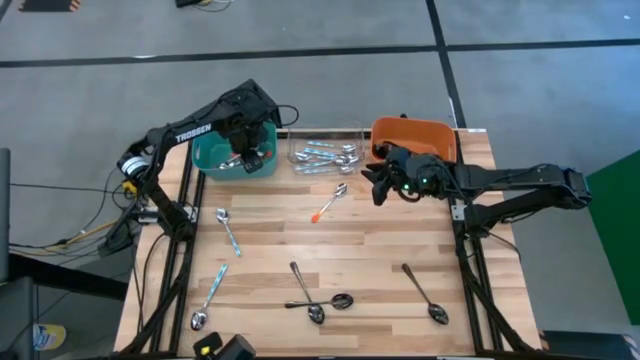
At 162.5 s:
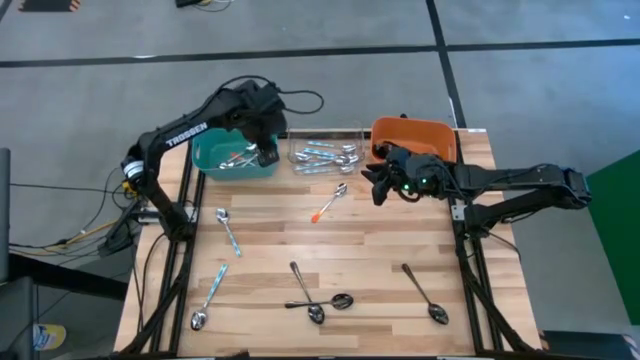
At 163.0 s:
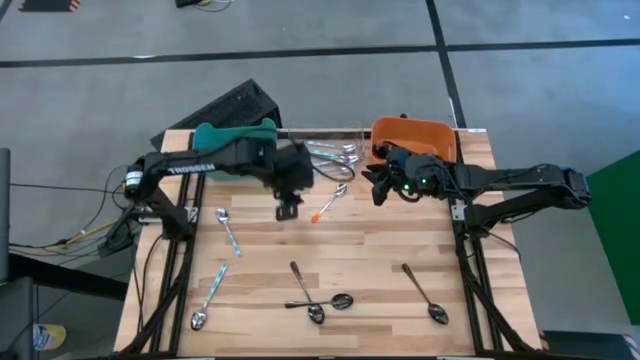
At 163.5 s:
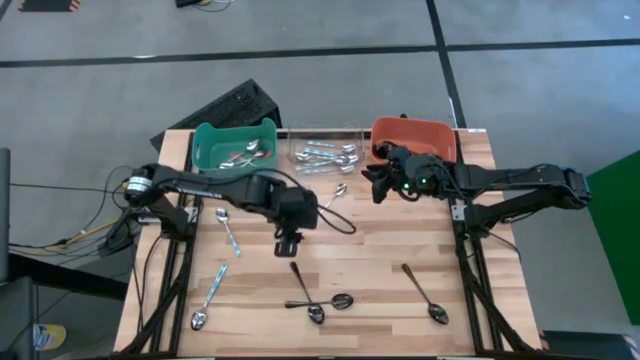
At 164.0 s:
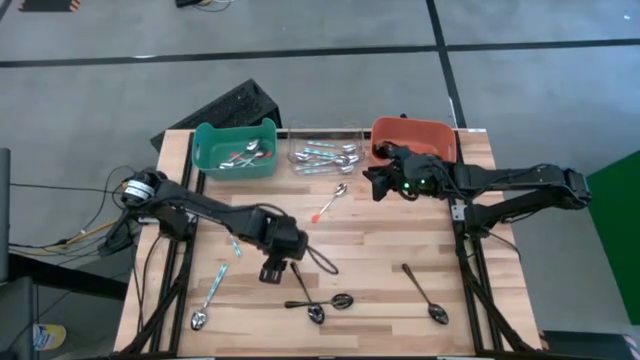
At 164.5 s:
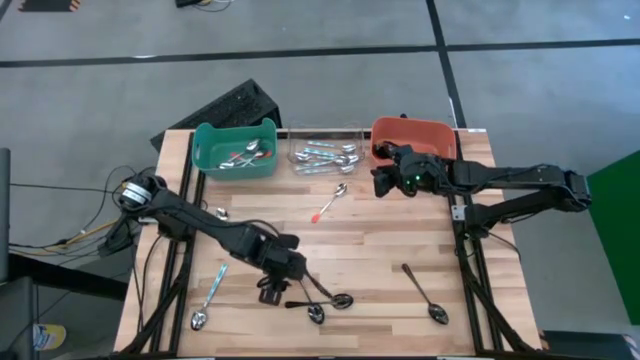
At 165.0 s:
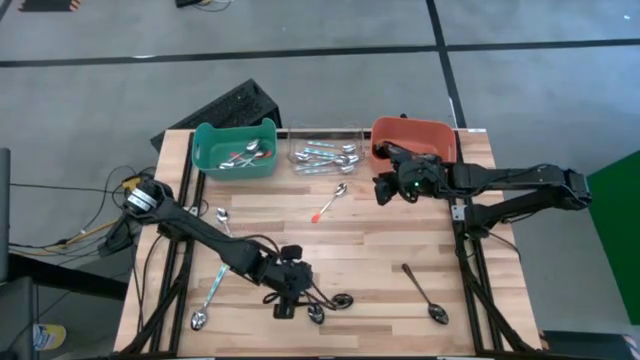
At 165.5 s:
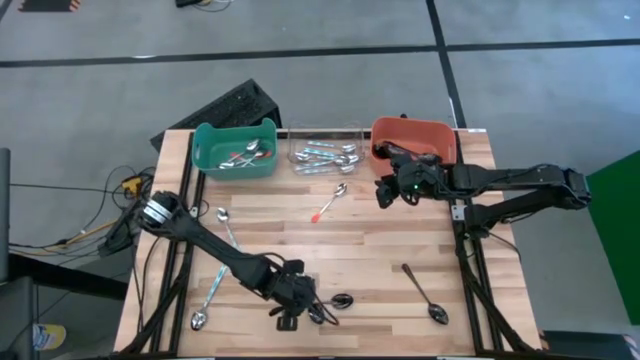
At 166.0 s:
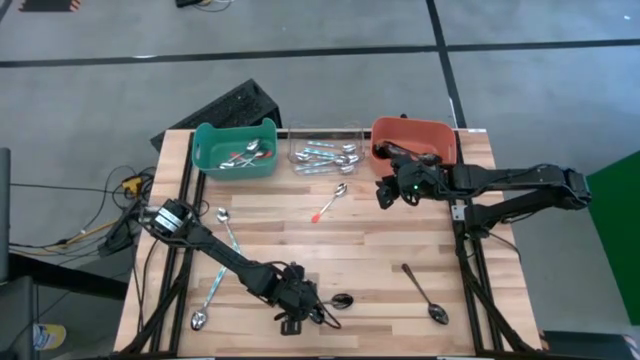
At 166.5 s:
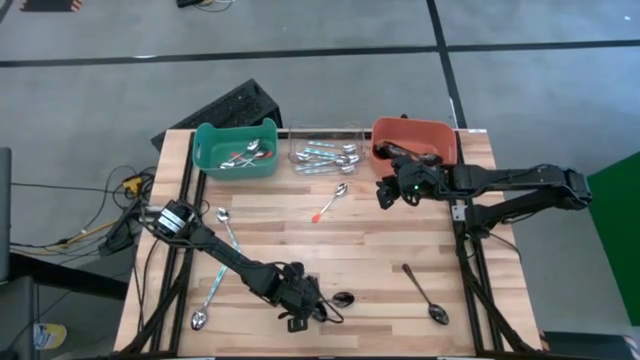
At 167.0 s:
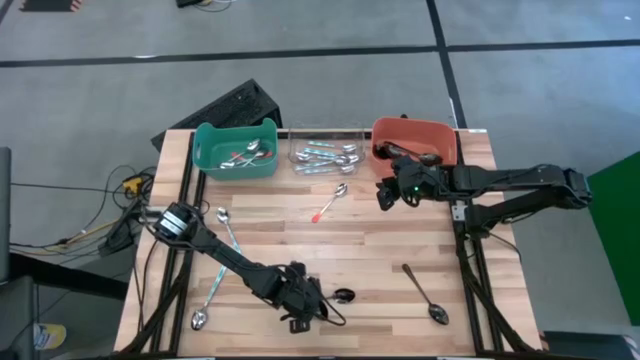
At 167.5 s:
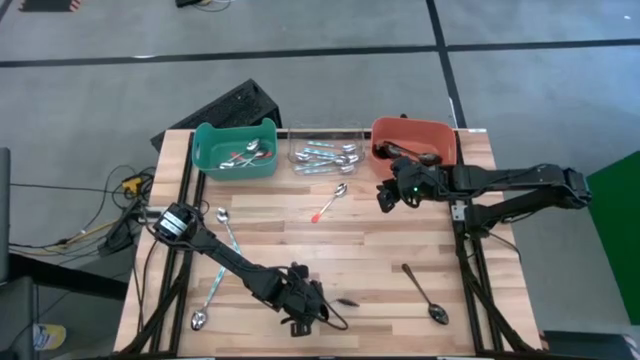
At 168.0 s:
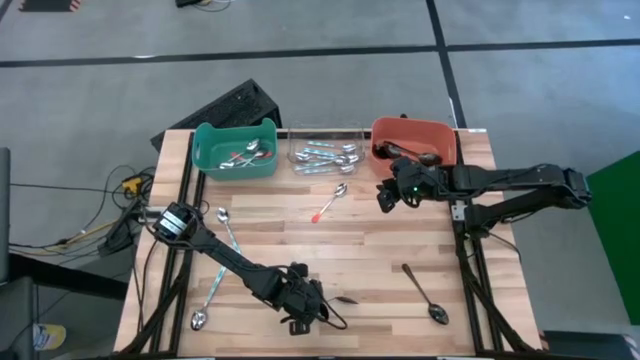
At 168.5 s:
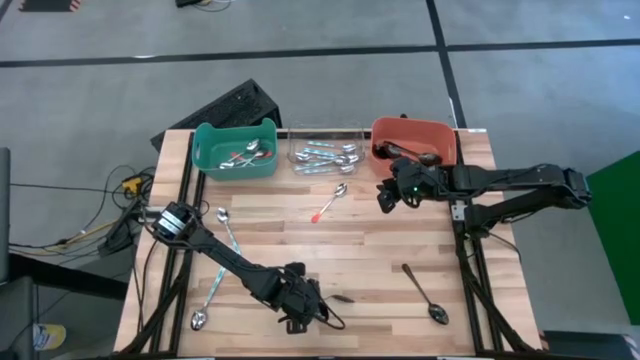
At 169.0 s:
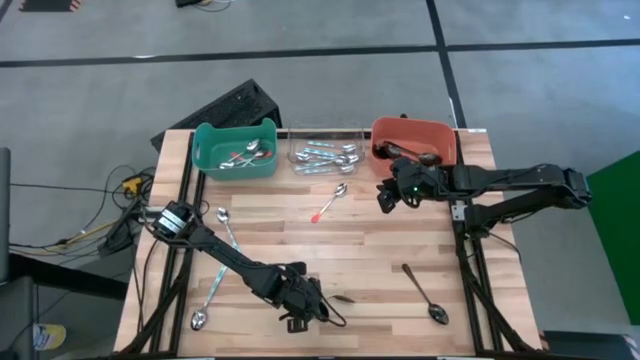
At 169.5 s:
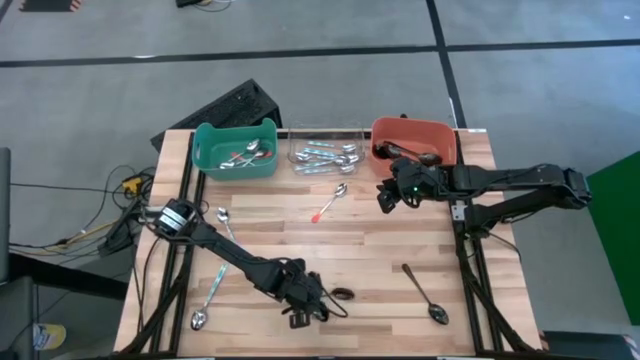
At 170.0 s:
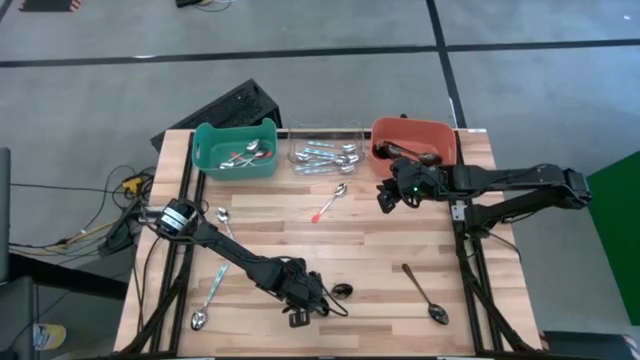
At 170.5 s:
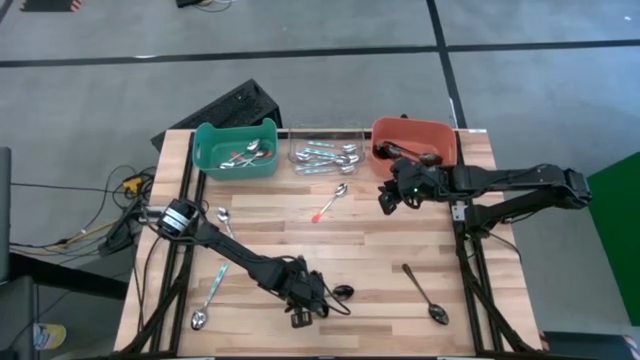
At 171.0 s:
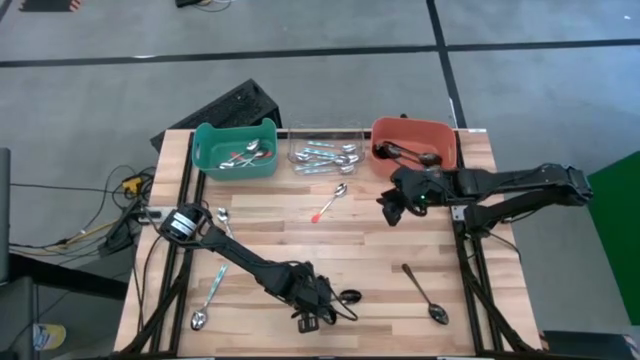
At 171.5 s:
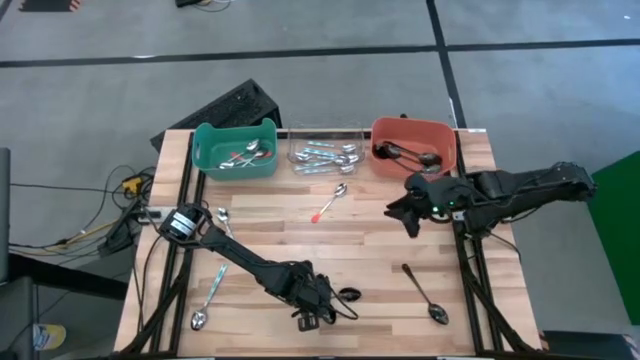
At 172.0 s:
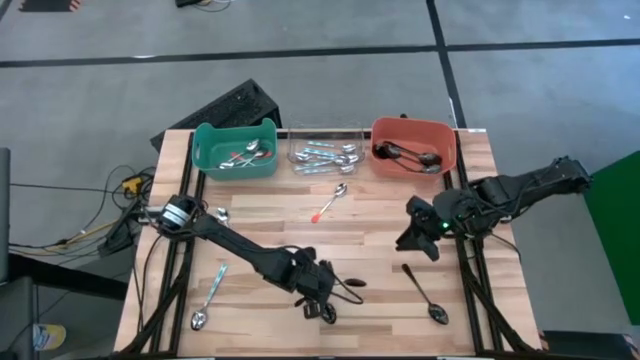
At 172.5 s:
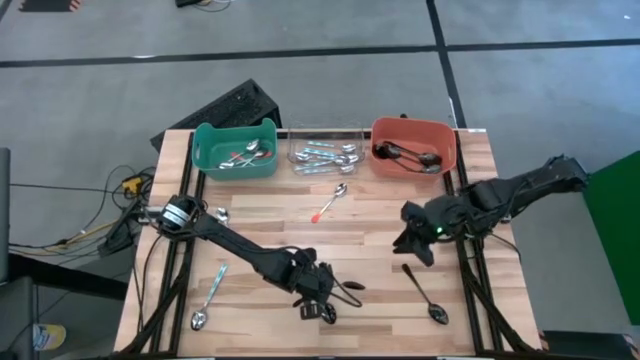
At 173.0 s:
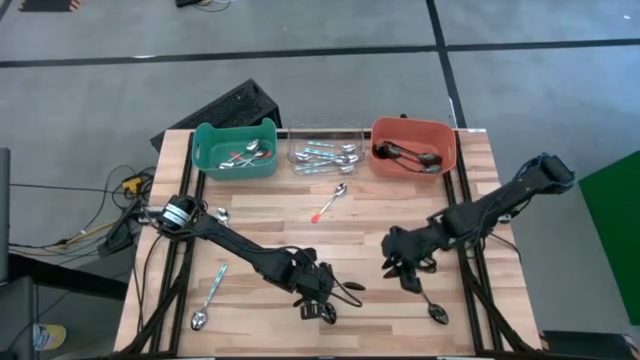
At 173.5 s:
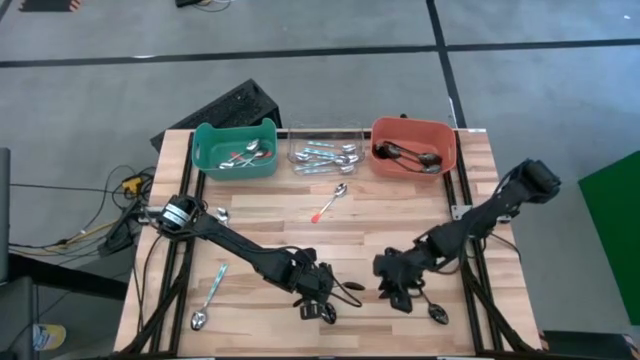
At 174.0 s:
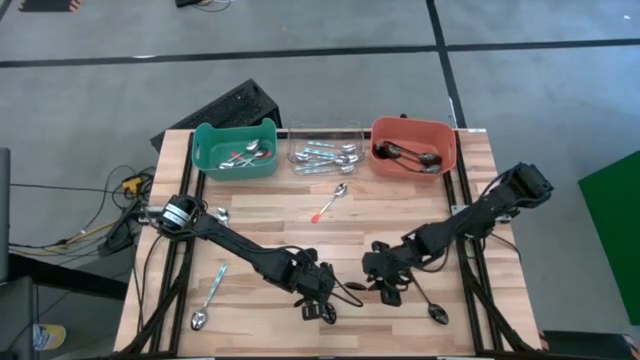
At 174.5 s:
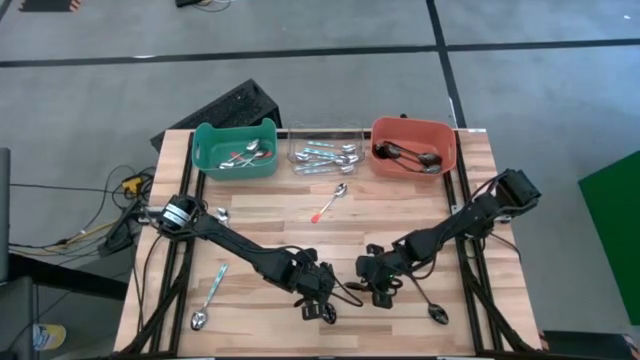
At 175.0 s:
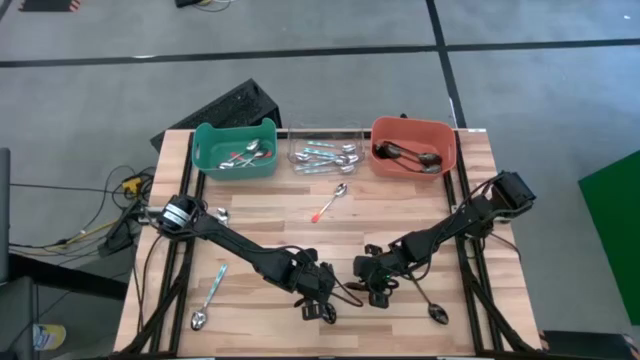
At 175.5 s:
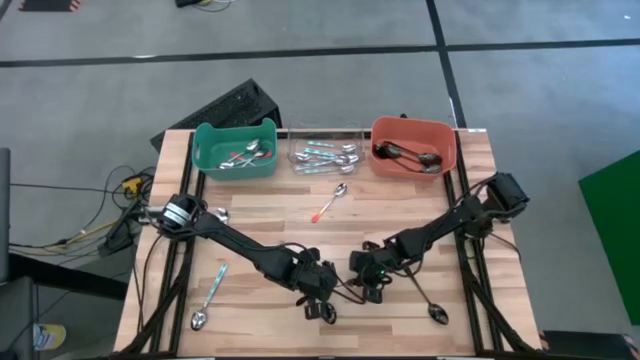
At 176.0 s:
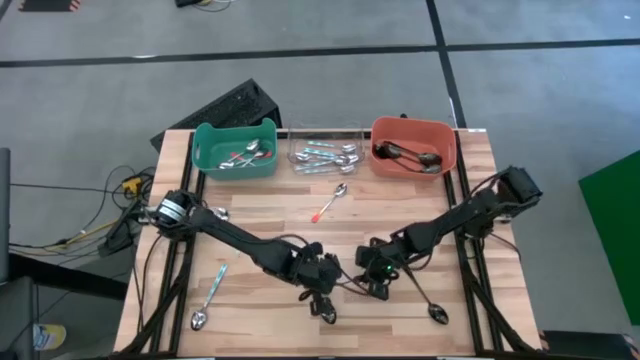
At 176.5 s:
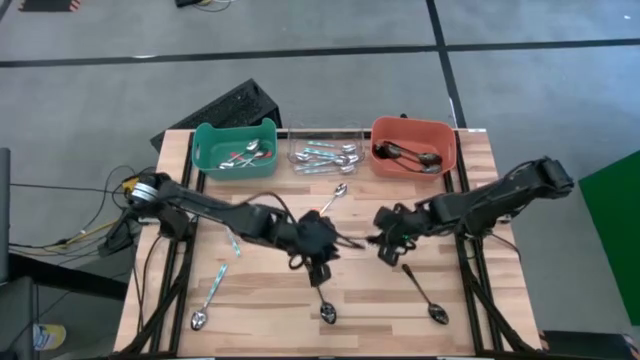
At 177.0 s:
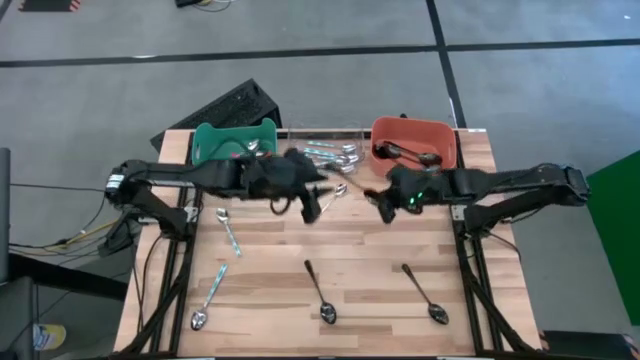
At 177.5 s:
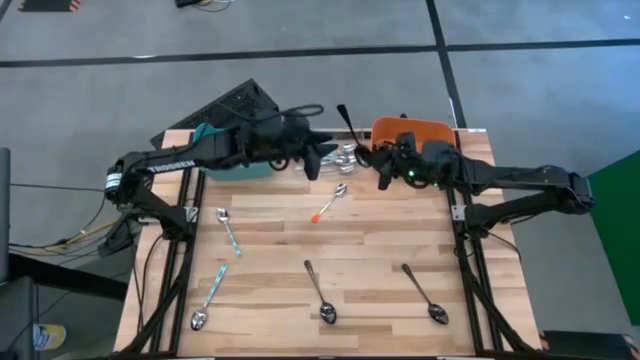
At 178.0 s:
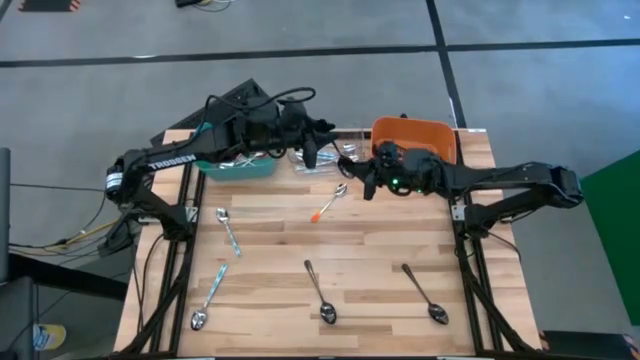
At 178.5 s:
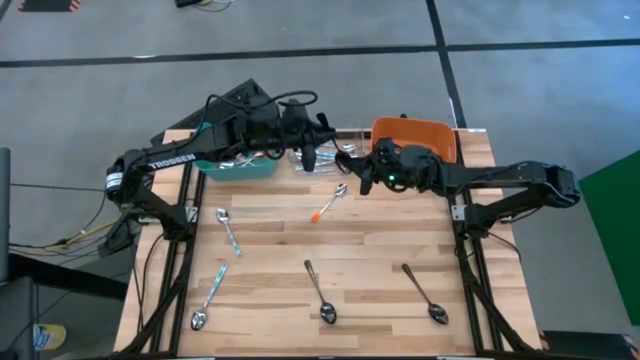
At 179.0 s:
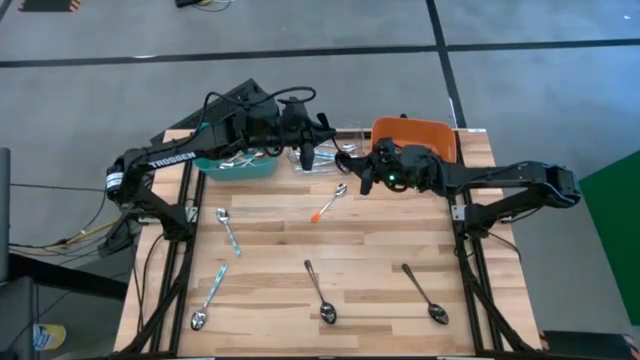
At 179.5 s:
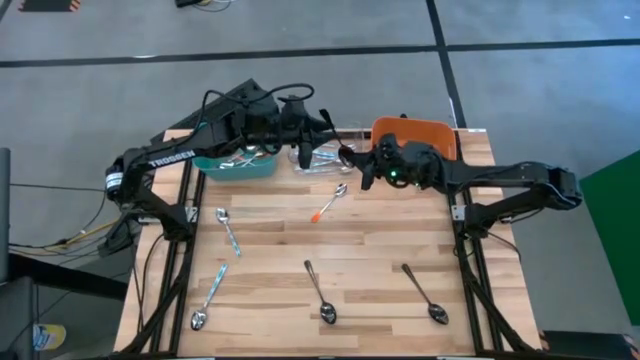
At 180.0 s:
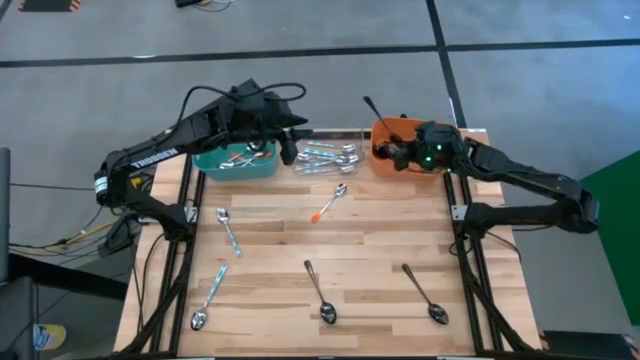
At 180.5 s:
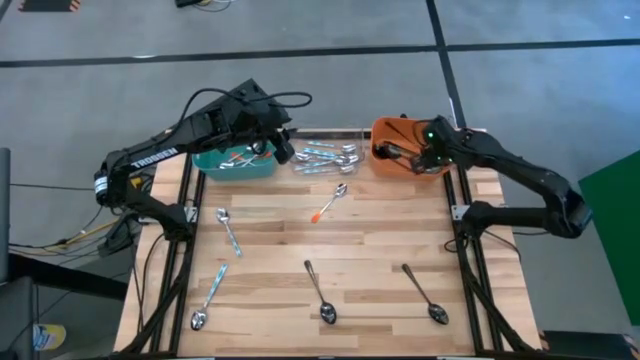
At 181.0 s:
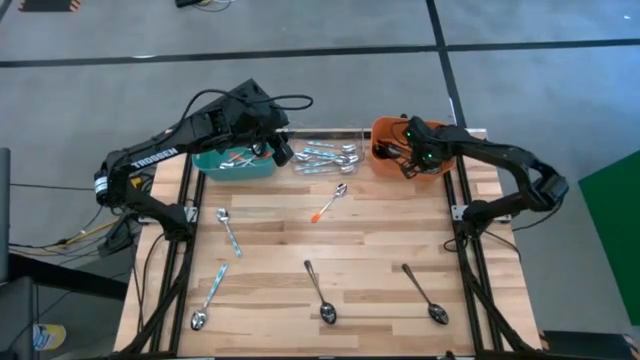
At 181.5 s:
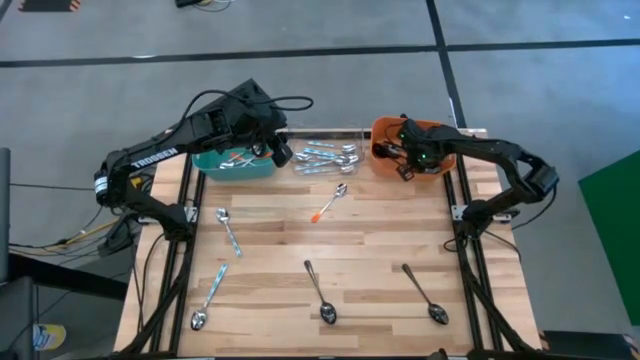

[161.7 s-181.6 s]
Task: Sort silverware by color (type)
Put the black spoon into the orange bin

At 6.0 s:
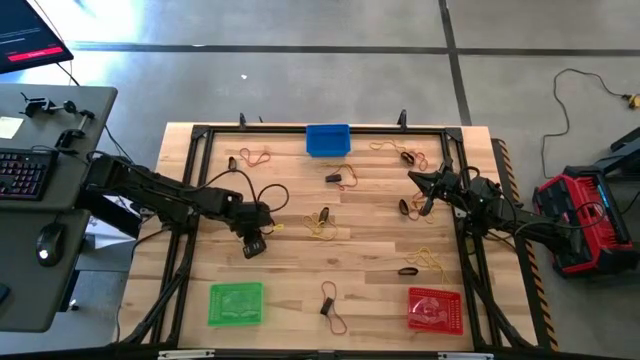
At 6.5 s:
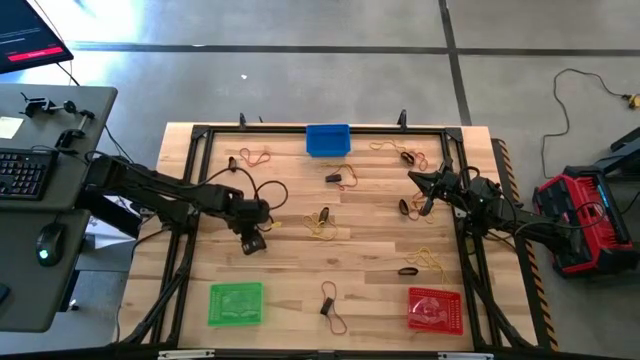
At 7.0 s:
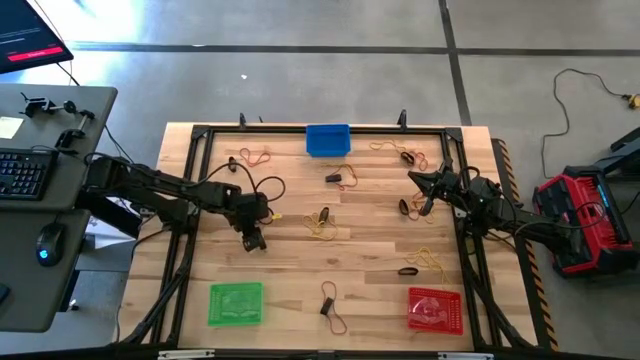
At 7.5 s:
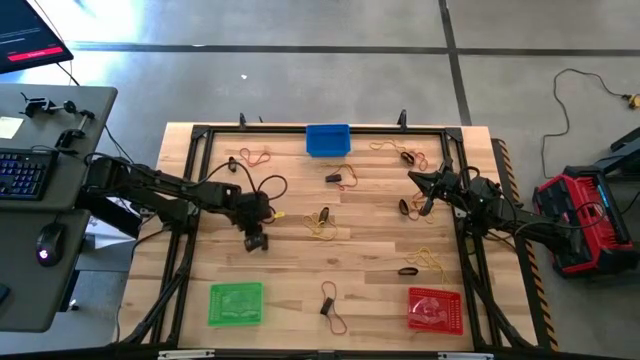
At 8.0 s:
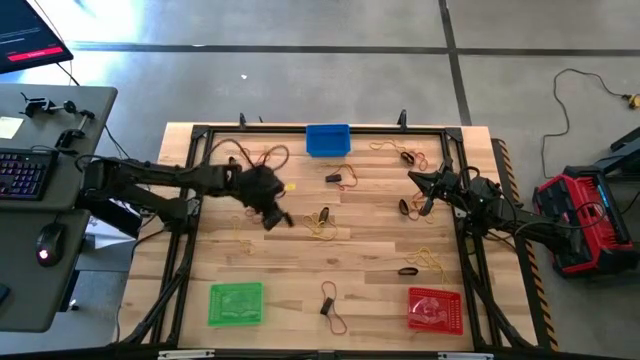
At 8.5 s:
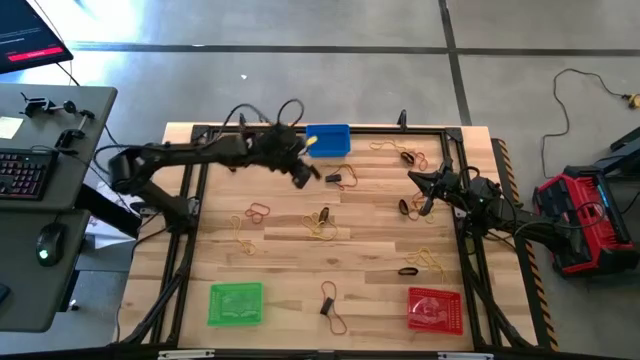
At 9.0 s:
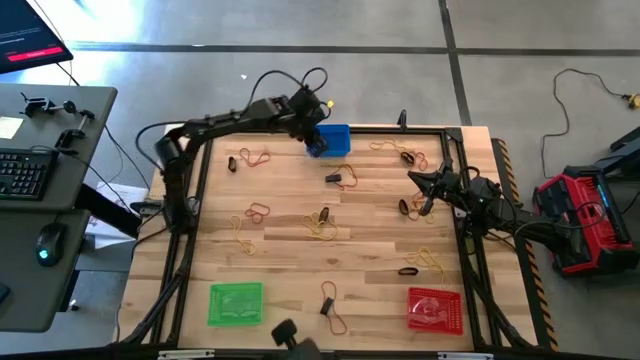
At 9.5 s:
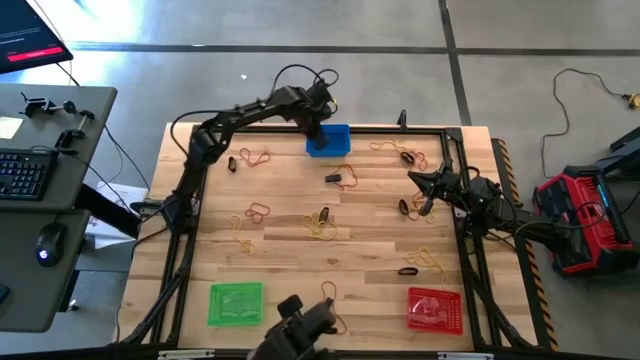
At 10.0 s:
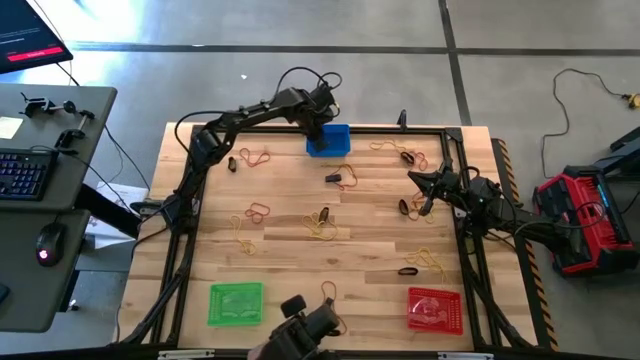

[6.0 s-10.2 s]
Task: Sort rubber bands into baskets
Put the black rubber band into the blue basket
